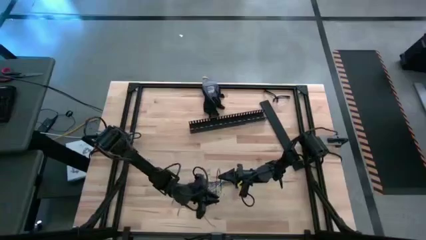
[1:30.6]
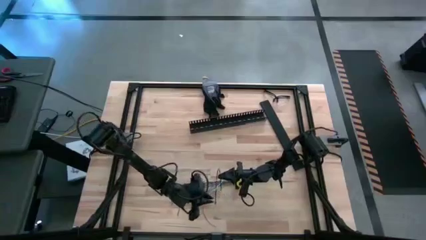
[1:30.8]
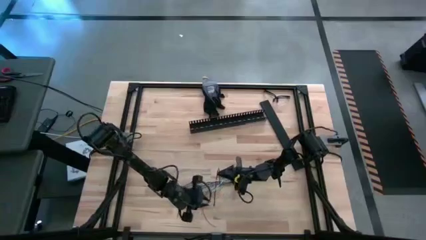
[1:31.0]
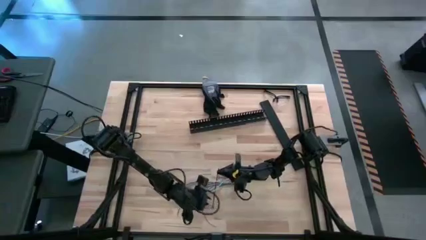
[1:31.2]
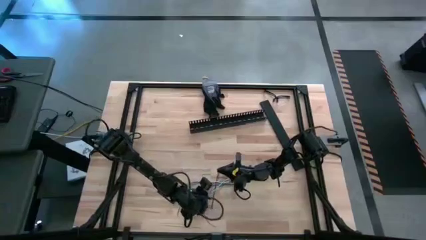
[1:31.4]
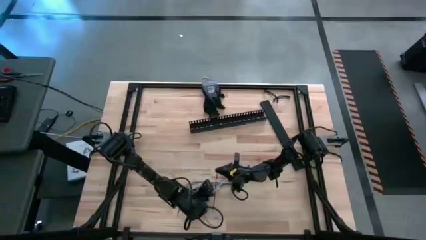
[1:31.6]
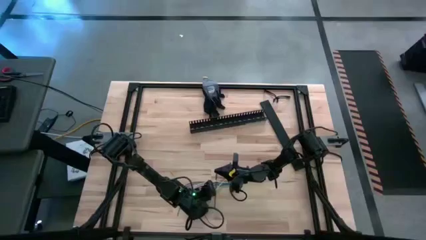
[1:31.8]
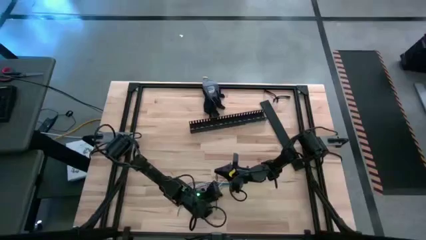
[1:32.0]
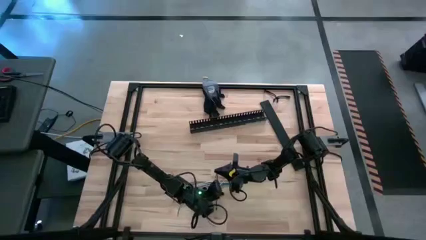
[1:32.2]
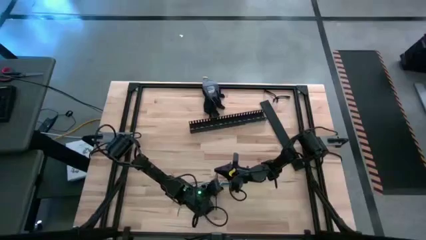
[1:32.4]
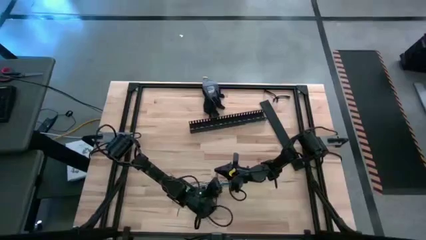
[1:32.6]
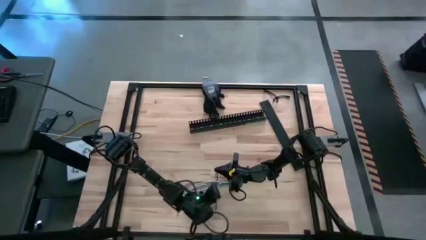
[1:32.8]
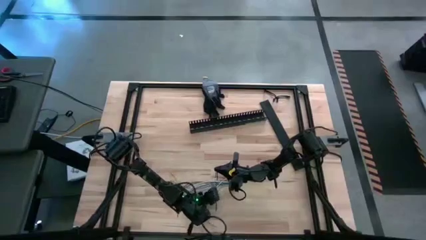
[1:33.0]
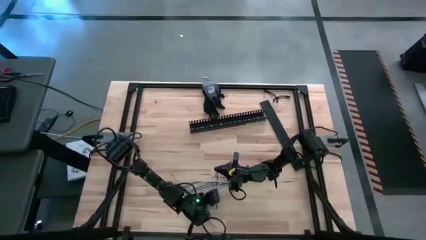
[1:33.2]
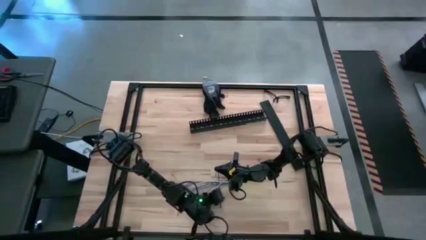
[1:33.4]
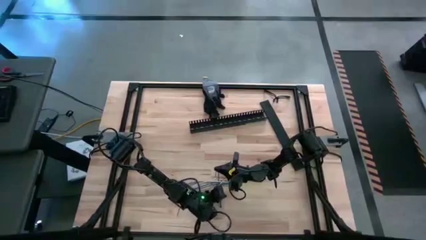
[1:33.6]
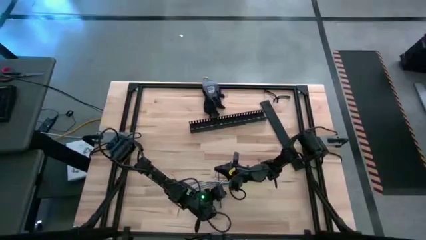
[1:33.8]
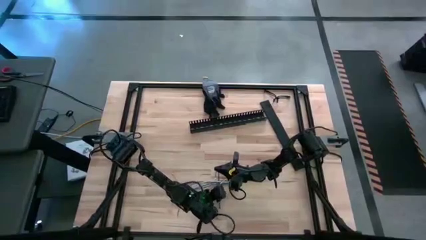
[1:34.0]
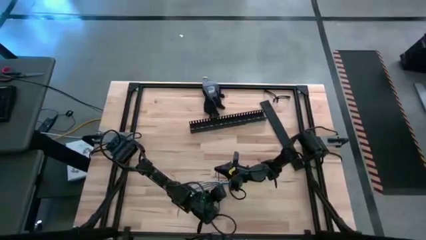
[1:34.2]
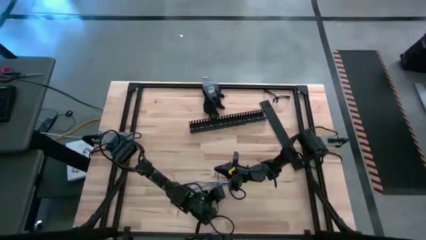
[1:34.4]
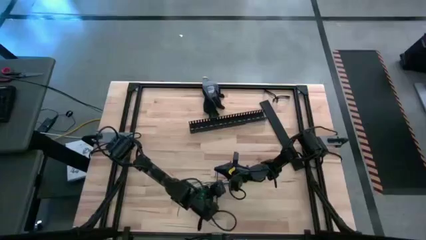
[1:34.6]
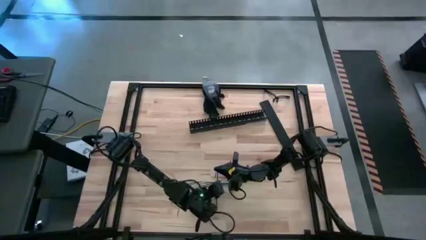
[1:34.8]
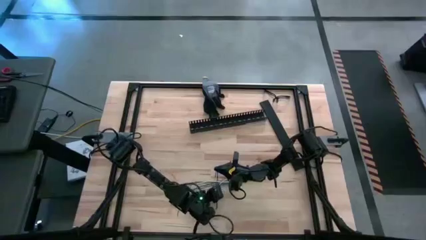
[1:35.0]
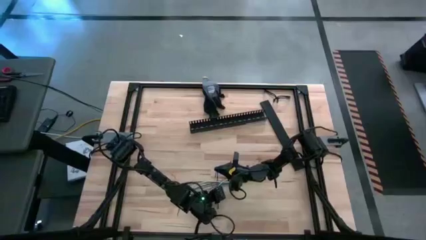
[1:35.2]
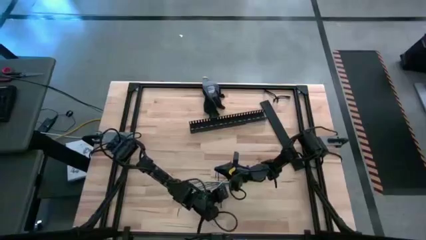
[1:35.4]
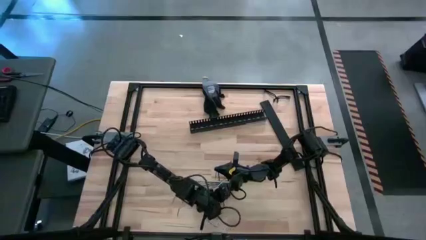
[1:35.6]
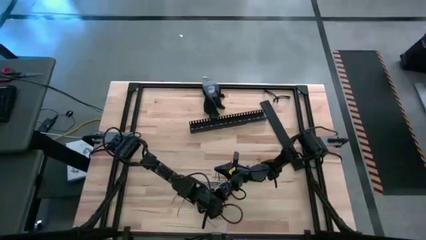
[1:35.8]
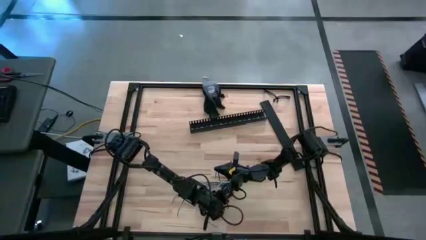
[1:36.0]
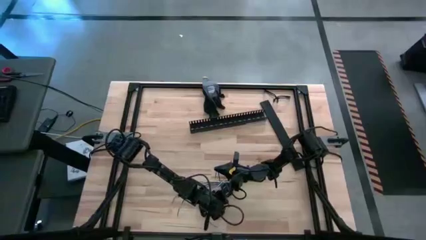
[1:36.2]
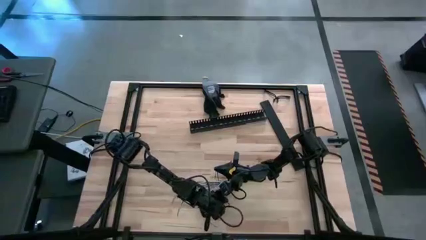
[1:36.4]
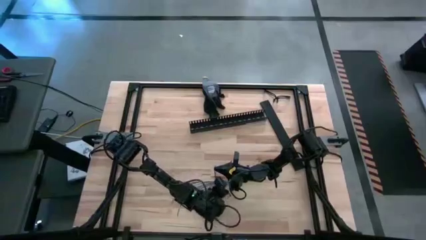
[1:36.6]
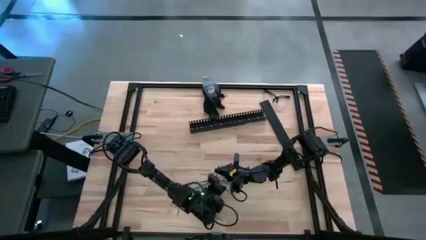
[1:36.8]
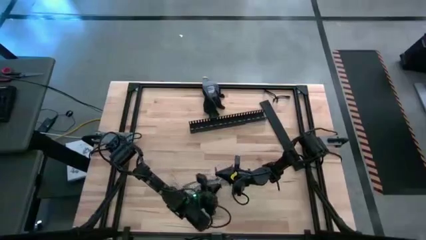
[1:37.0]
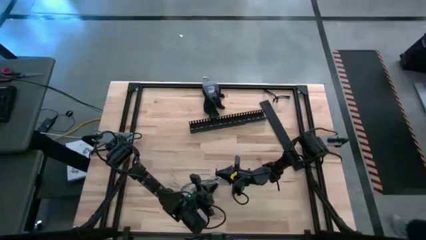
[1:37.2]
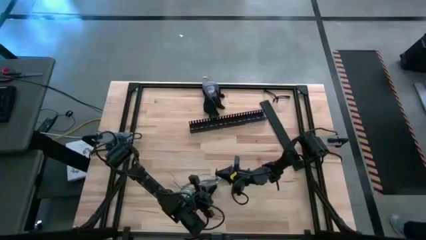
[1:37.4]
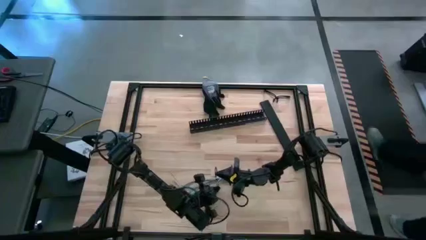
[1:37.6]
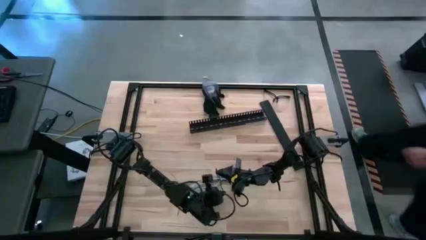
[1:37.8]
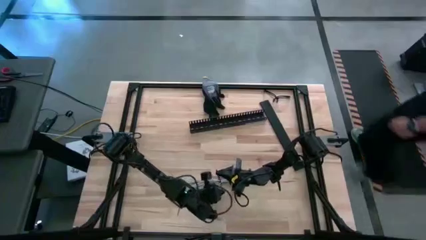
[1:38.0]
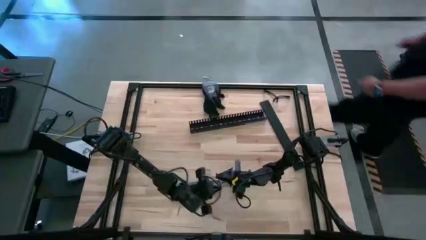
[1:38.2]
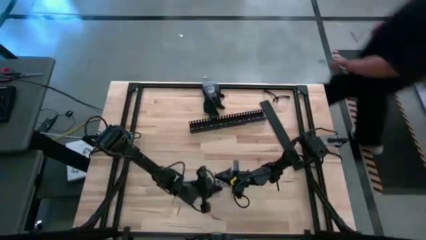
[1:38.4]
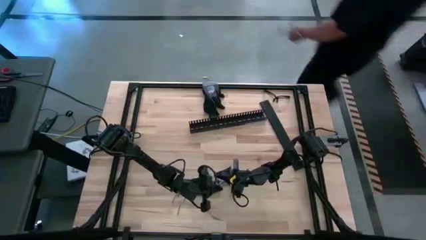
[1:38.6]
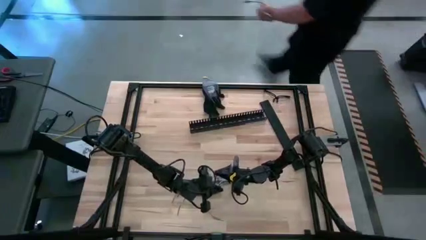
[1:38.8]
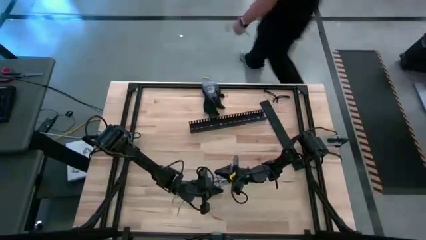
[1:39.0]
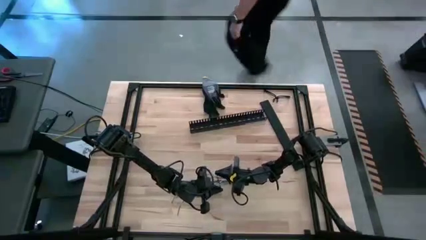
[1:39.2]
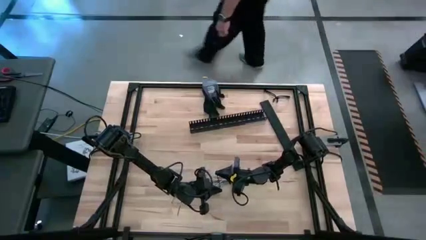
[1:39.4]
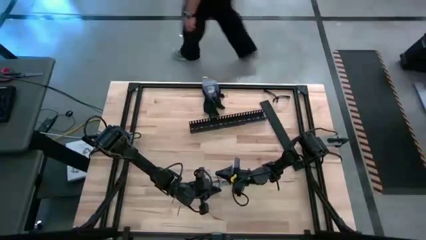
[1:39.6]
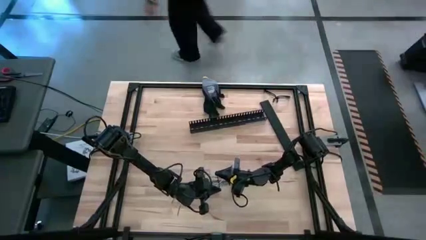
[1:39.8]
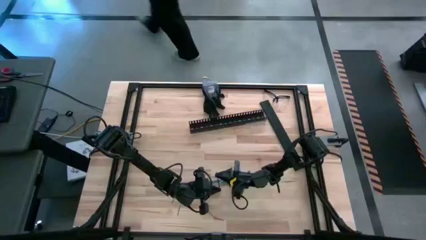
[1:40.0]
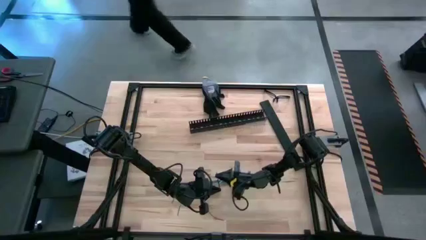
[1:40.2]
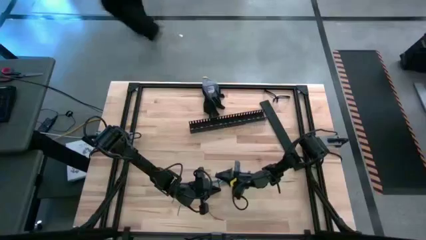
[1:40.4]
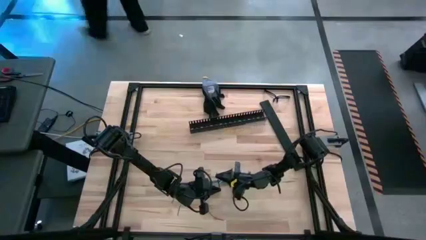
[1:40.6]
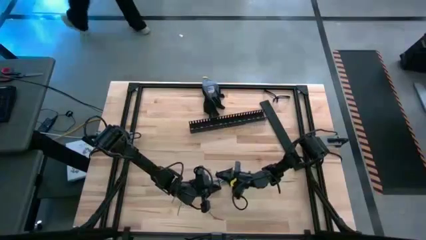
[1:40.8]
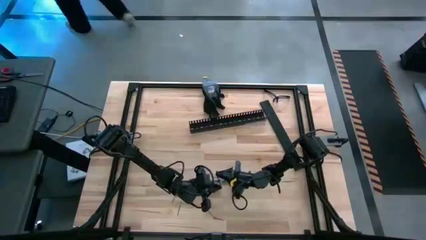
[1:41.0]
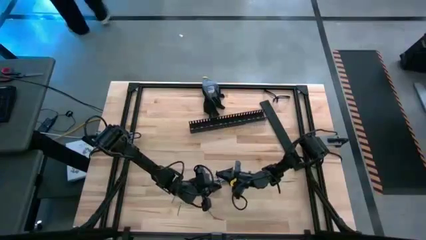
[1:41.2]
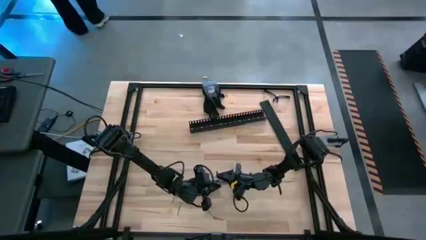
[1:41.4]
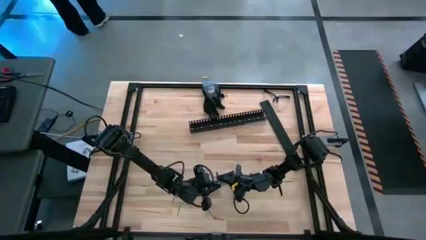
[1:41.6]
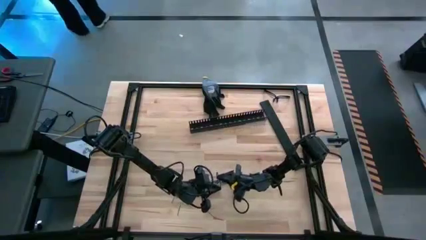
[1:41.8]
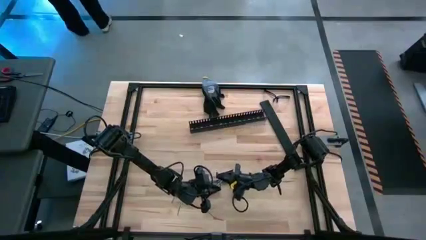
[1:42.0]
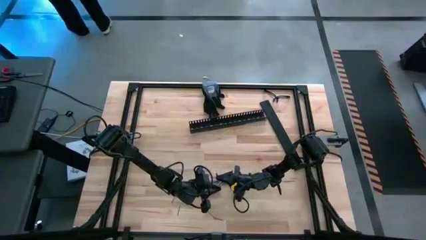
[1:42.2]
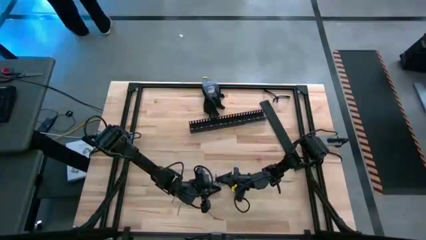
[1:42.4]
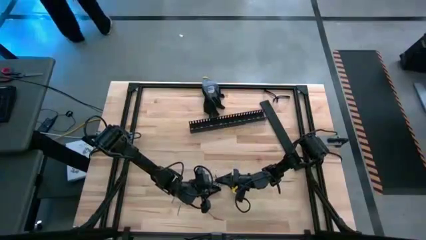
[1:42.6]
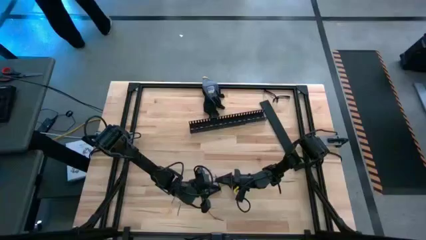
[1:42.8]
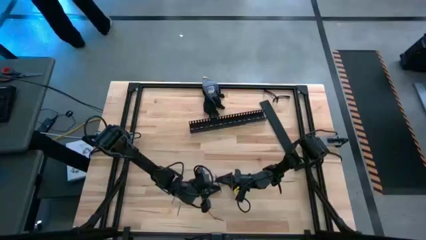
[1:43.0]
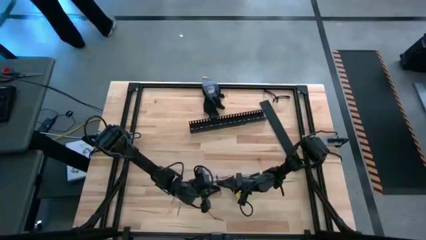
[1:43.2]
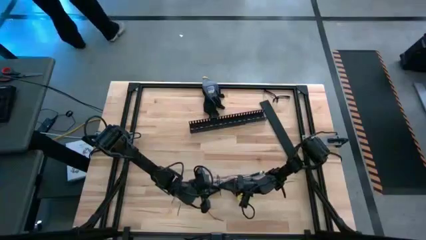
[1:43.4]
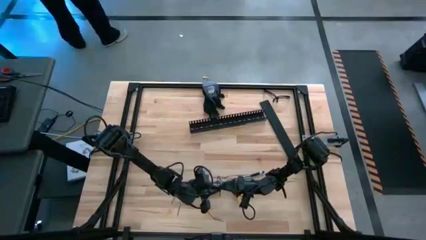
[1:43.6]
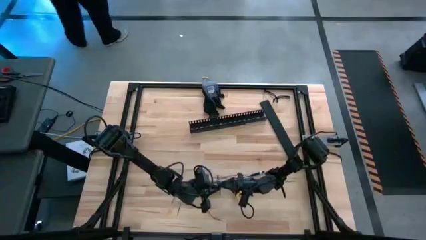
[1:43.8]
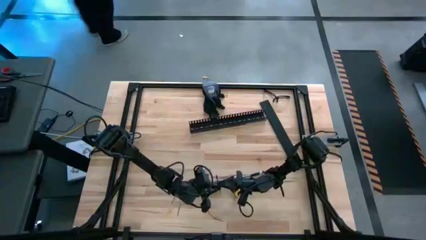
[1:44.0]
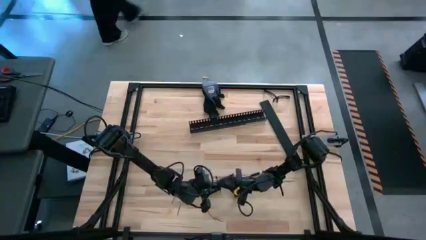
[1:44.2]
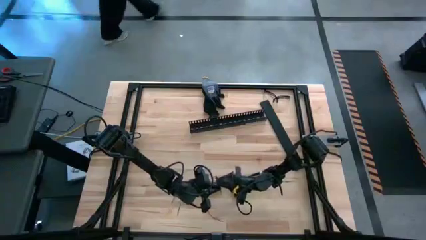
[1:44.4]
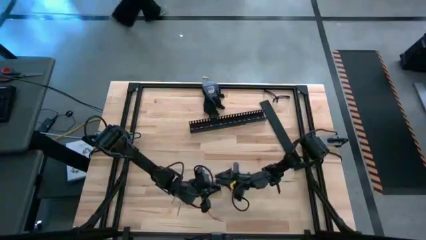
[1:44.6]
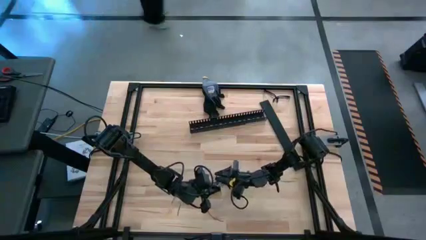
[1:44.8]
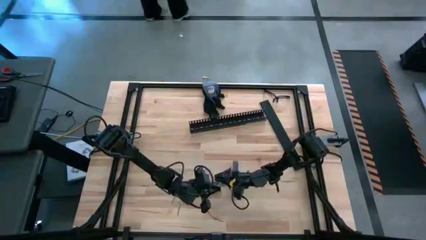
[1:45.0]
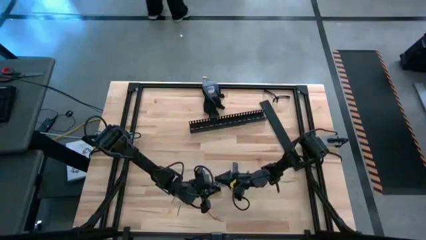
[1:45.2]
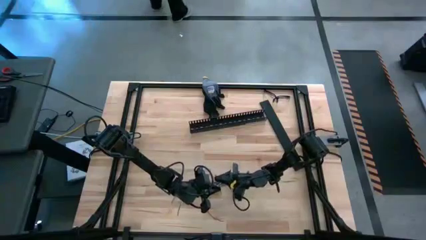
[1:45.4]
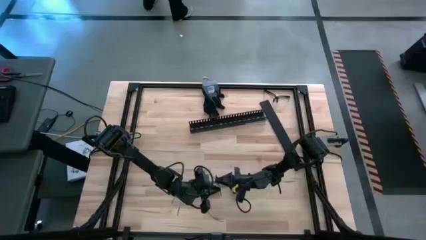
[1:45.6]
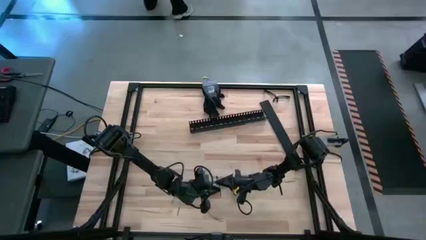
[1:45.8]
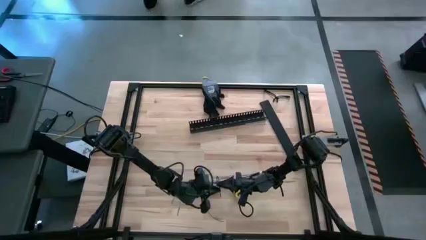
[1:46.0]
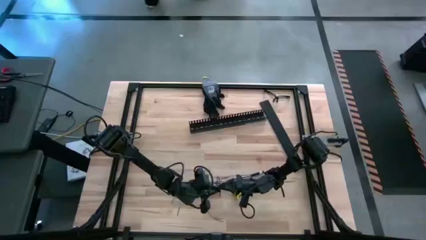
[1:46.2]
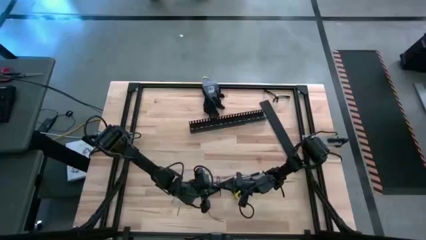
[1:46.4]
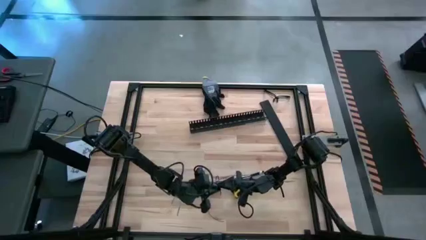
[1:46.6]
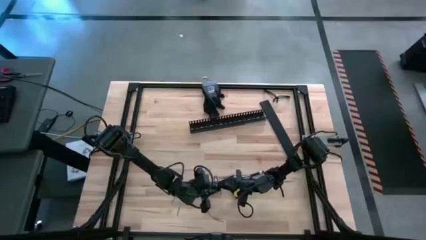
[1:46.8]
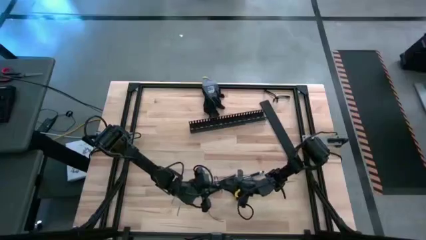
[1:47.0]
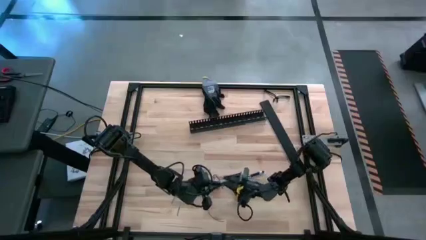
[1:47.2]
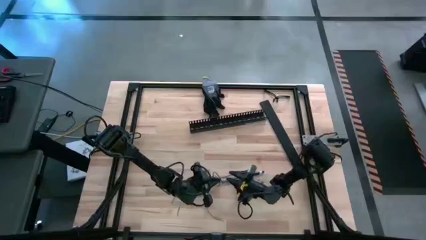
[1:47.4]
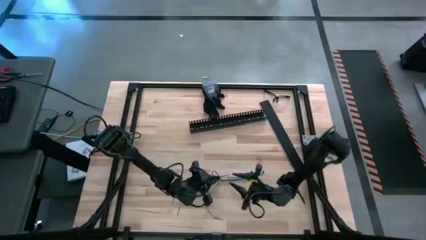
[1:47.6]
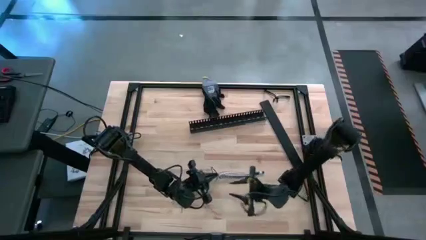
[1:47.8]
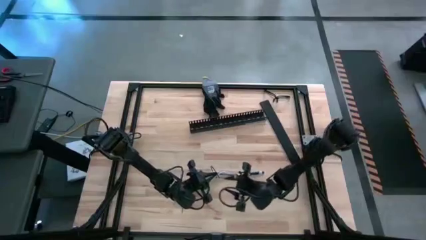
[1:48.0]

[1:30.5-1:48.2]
Task: Ziptie cables
Wrap the colored loose cables with the black zip tie
